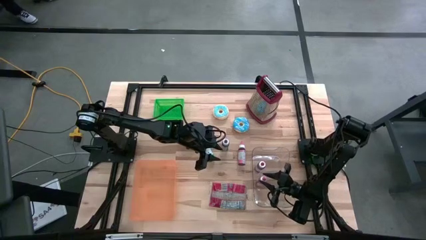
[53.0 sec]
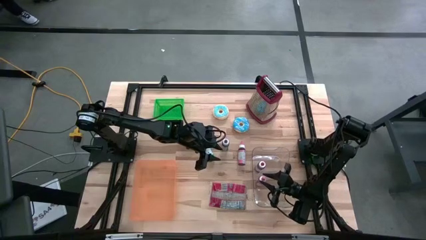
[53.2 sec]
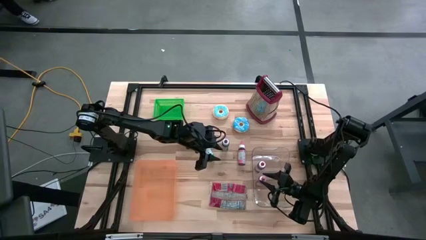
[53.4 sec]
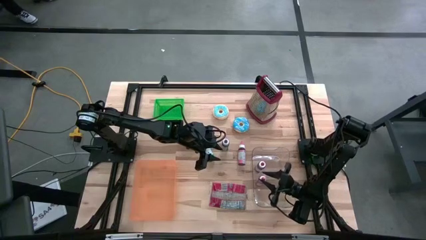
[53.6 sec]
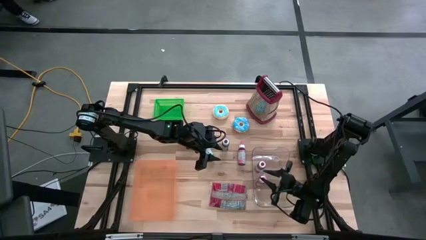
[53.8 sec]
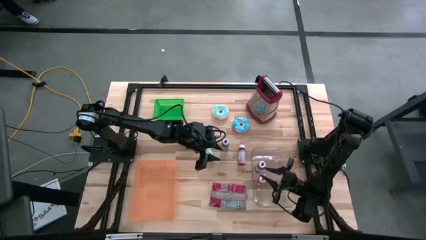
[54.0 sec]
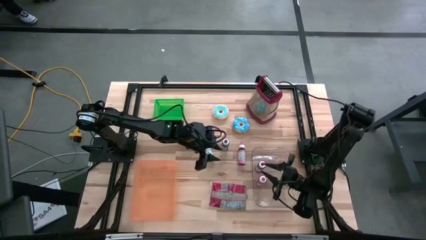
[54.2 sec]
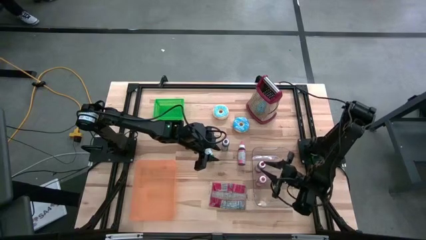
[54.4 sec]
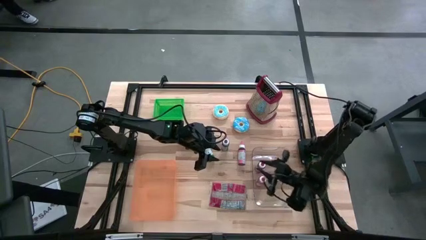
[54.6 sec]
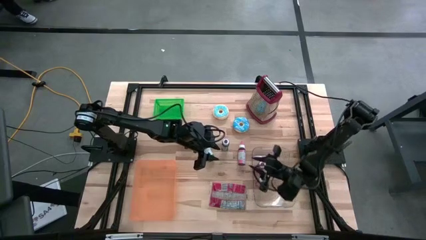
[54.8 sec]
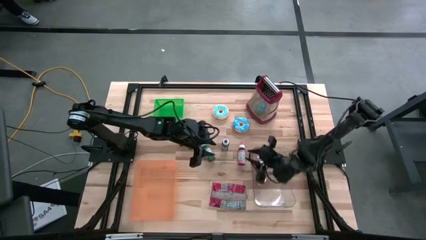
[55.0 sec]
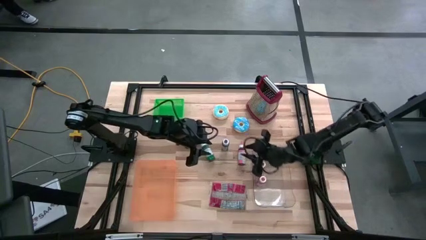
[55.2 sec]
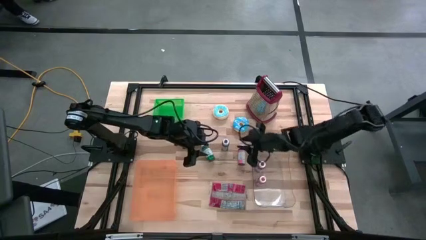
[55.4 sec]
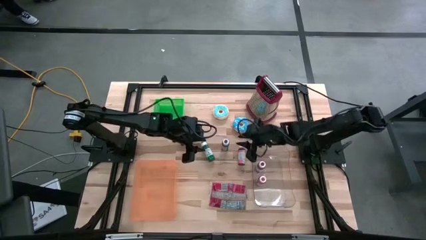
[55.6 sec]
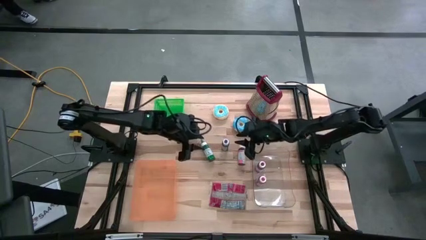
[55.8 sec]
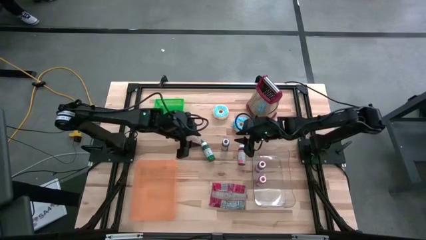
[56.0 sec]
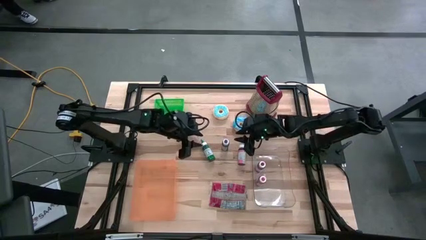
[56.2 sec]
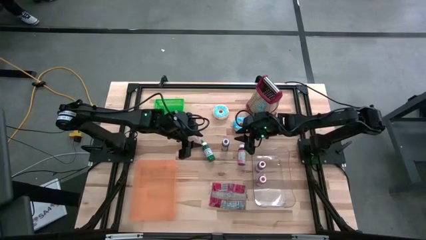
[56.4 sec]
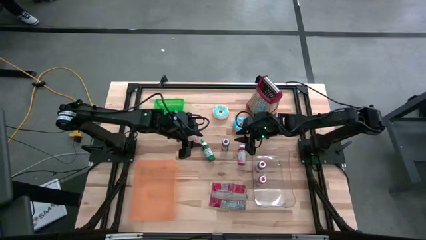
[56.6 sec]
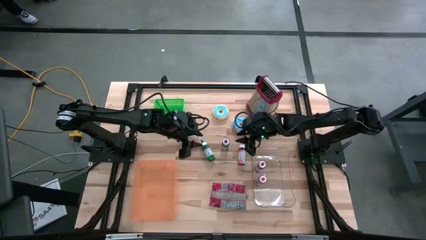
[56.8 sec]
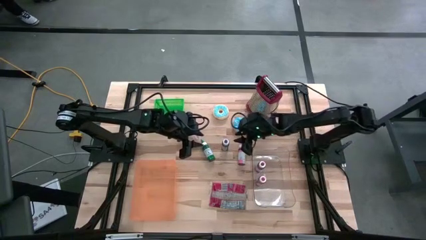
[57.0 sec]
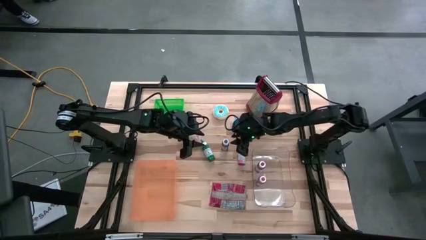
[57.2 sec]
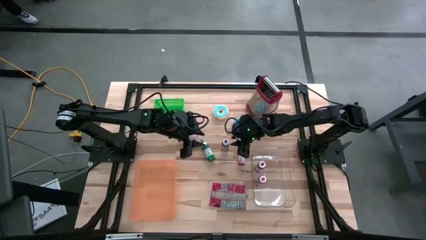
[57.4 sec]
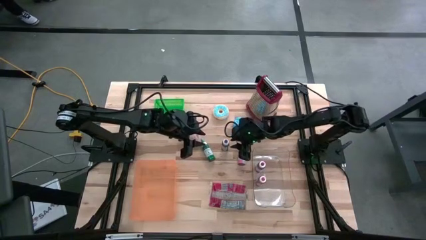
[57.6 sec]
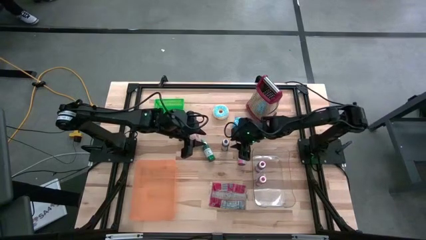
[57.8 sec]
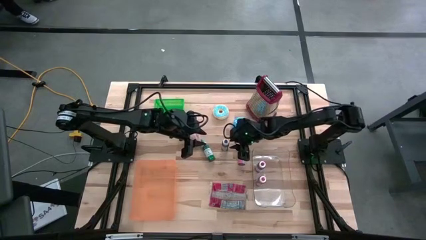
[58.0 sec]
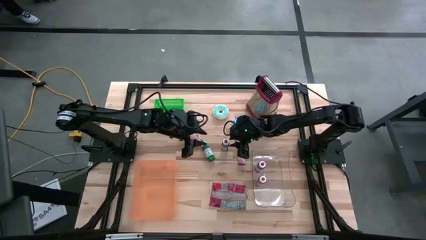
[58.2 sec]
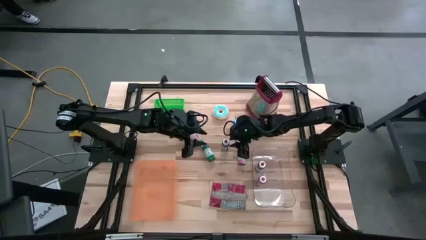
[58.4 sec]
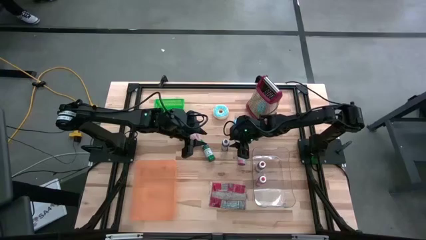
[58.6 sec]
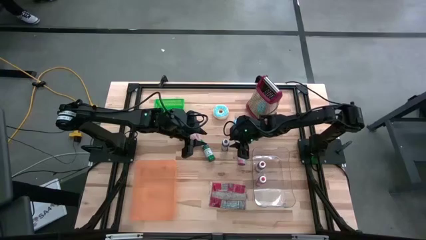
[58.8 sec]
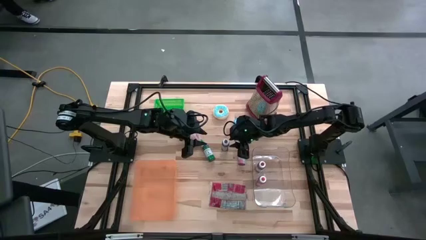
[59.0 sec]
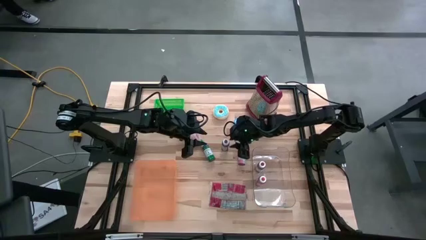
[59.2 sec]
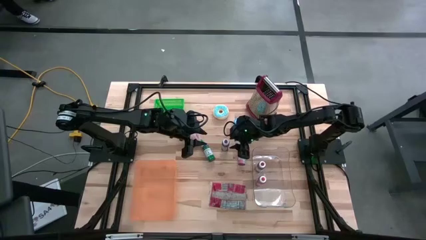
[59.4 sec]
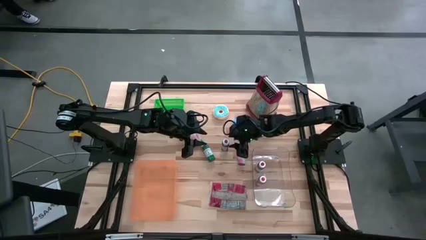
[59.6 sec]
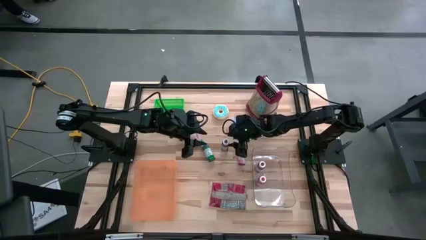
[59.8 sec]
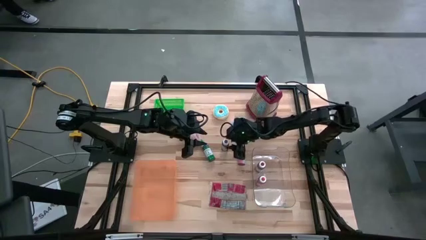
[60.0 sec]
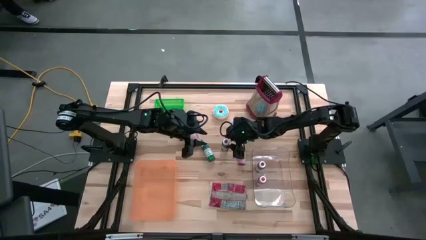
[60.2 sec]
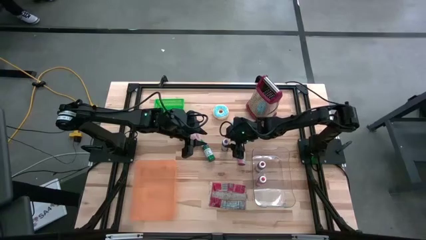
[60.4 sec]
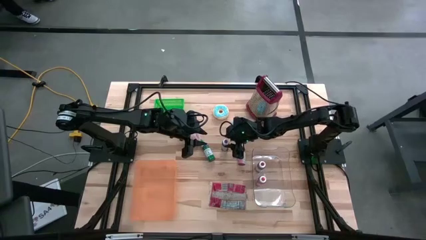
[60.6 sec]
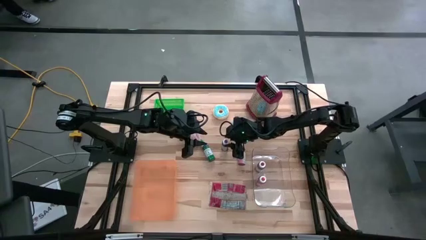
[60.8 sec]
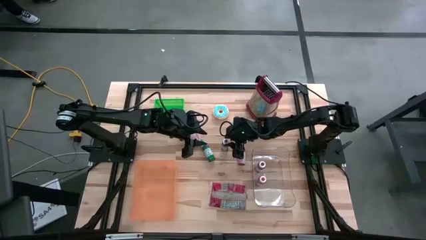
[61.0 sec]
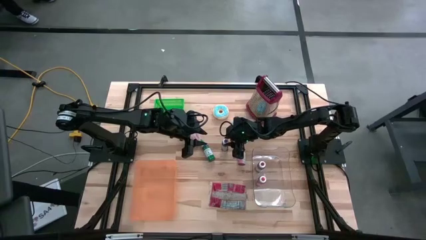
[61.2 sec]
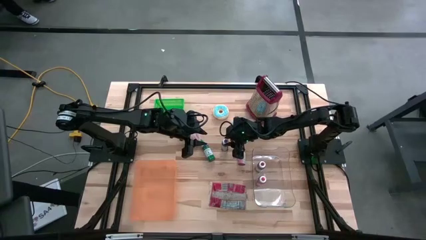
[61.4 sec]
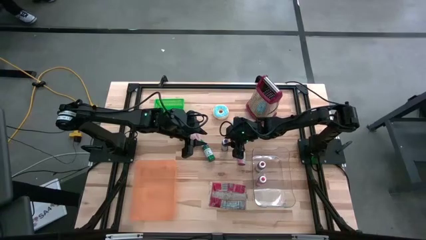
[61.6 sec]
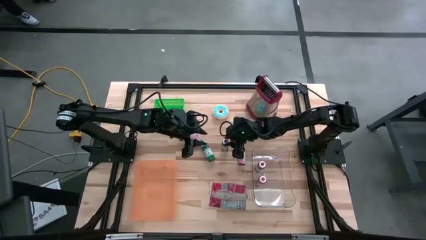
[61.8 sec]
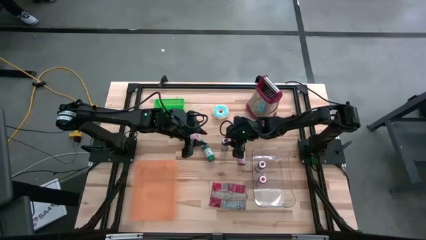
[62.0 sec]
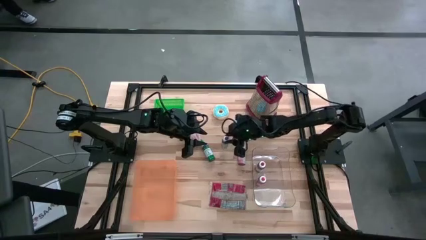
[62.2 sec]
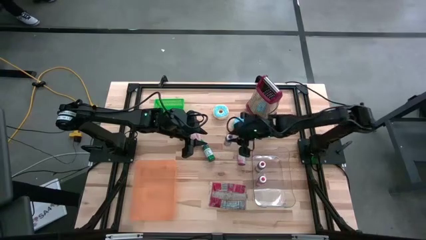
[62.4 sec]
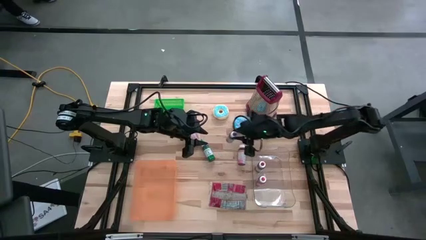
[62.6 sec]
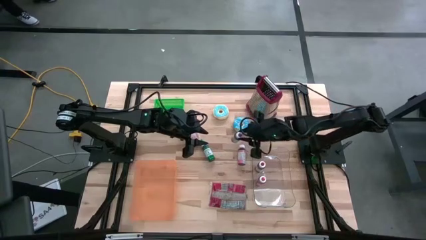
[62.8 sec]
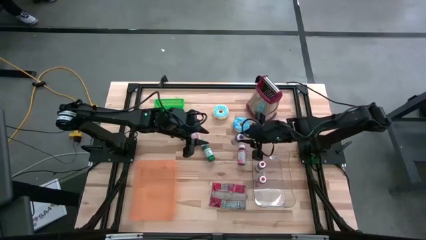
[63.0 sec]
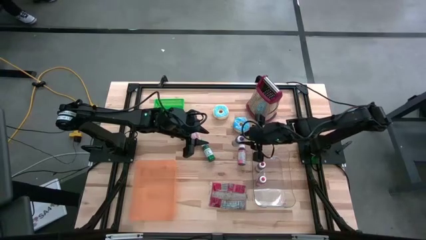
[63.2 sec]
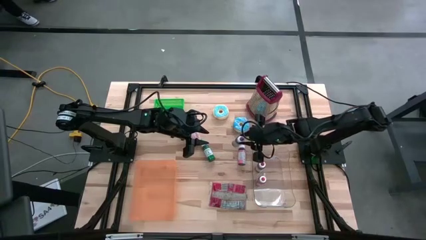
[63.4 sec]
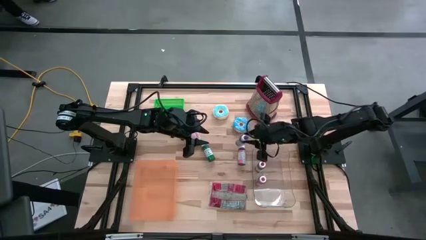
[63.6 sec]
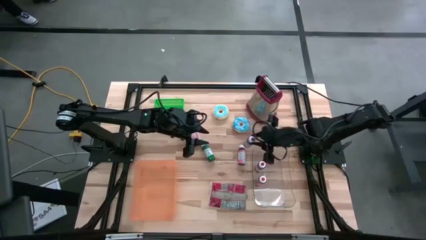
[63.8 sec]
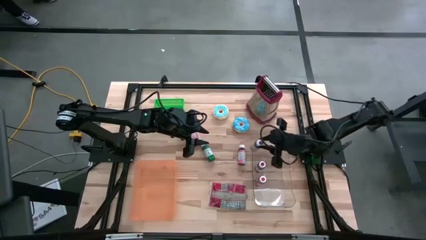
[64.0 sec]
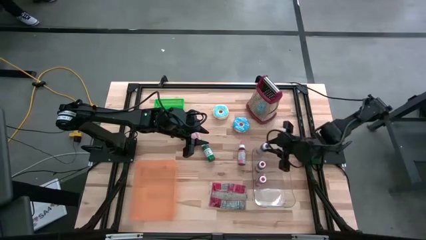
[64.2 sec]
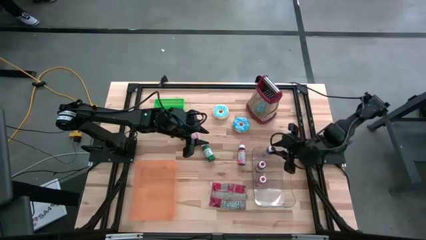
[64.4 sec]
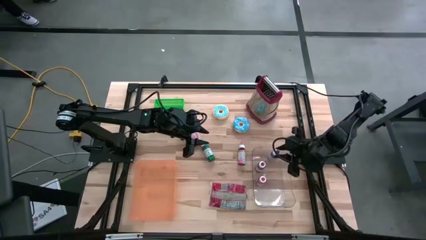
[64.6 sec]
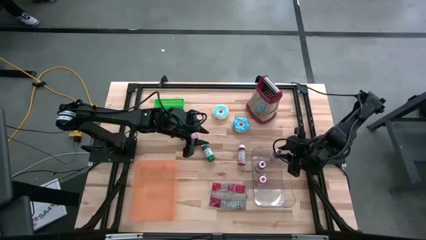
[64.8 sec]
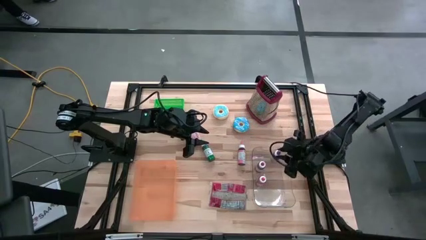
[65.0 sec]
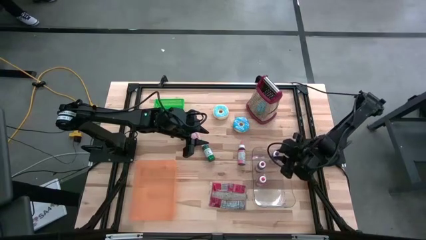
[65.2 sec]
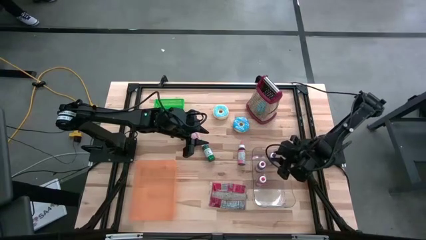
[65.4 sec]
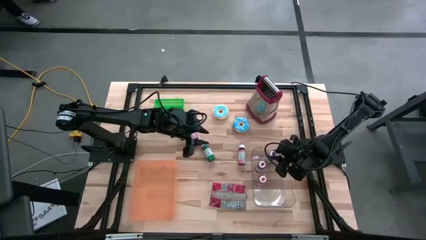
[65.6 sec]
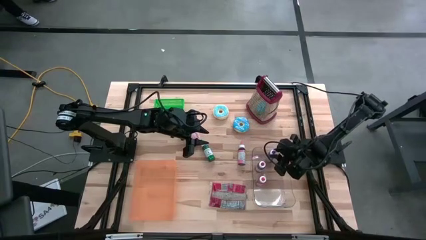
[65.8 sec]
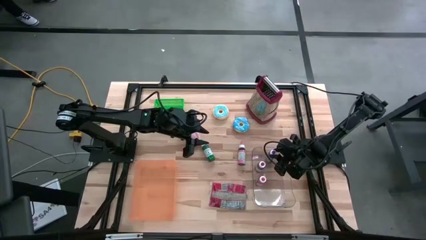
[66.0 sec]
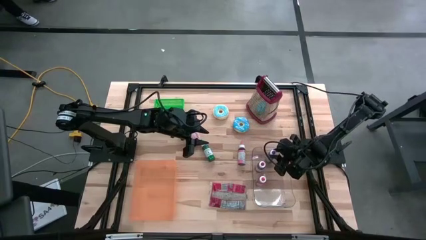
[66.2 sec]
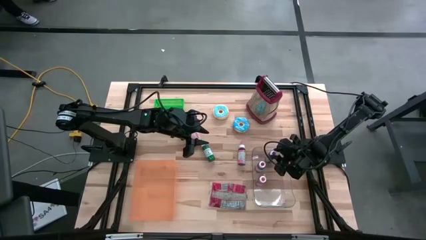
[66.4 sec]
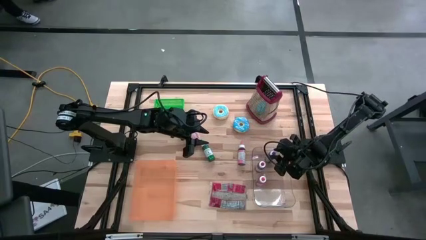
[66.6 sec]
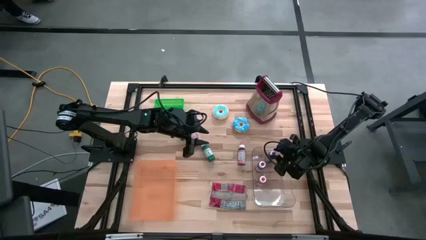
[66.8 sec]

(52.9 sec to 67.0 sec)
Put the purple paint bottle into the transparent bin

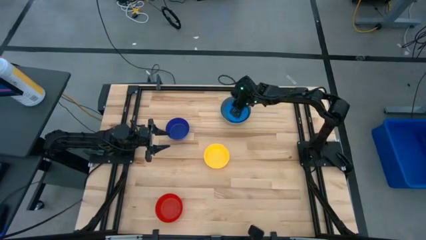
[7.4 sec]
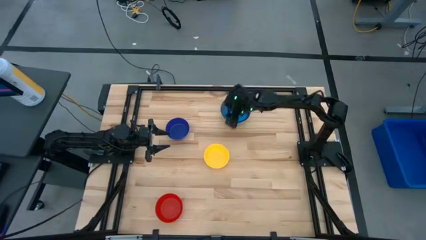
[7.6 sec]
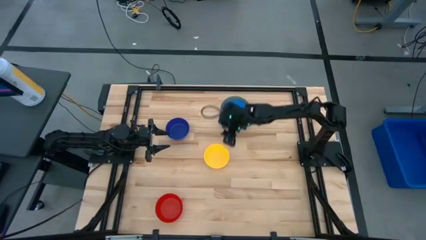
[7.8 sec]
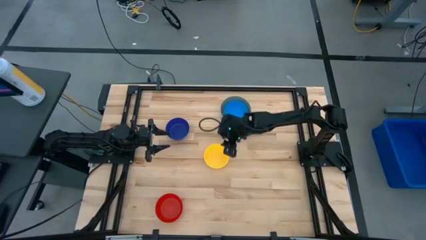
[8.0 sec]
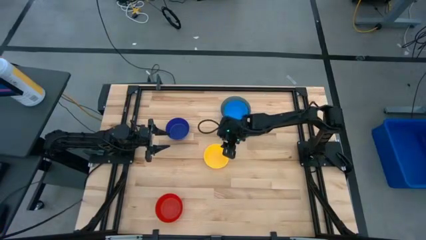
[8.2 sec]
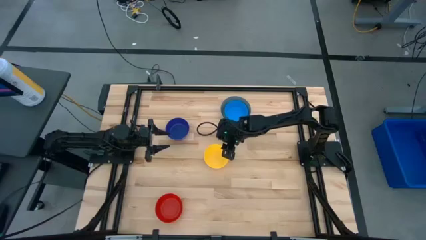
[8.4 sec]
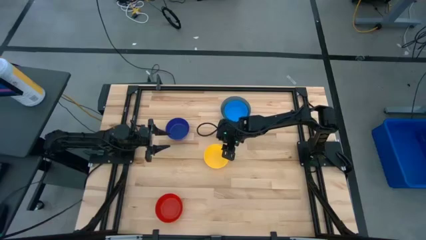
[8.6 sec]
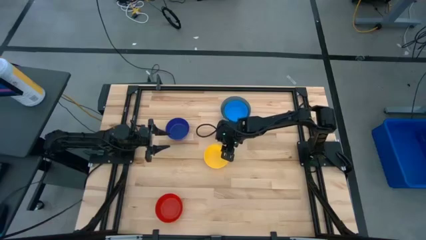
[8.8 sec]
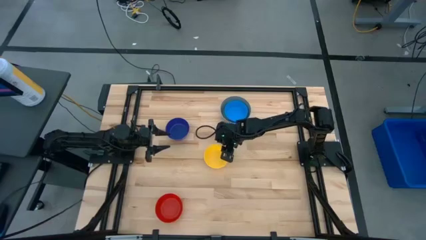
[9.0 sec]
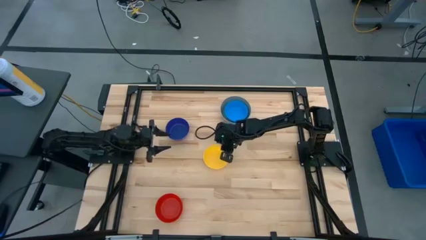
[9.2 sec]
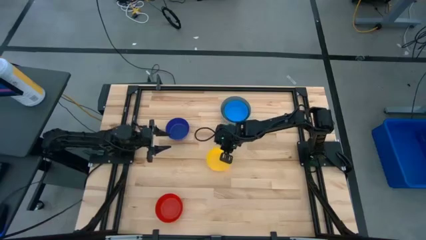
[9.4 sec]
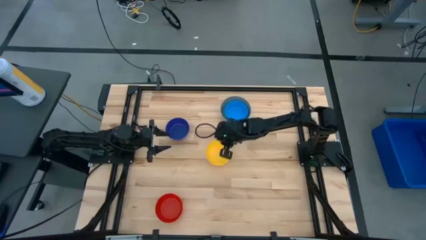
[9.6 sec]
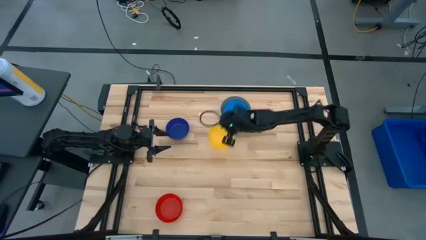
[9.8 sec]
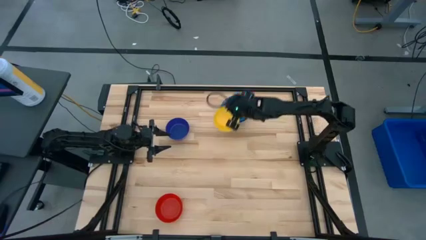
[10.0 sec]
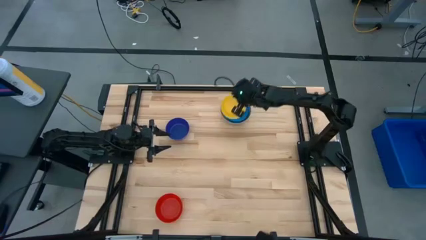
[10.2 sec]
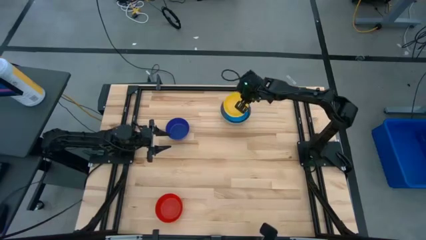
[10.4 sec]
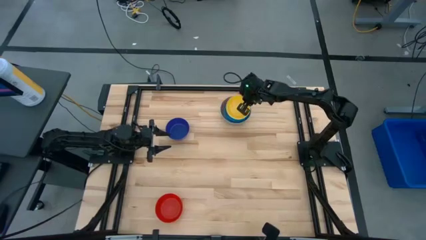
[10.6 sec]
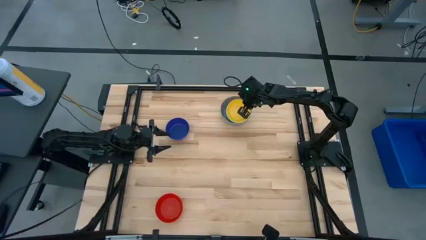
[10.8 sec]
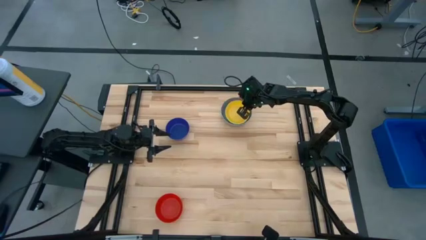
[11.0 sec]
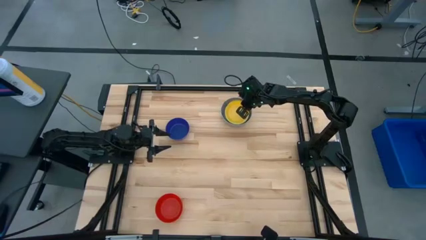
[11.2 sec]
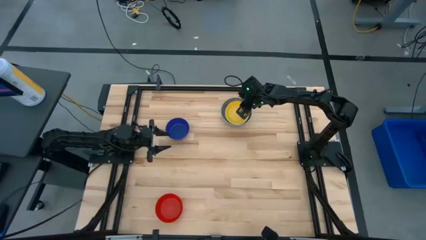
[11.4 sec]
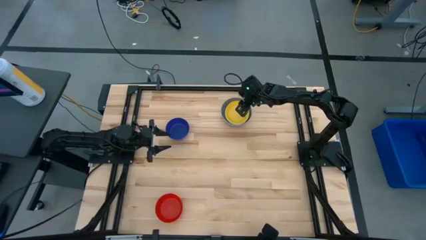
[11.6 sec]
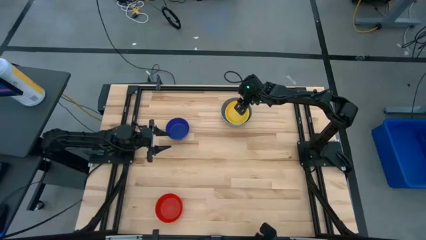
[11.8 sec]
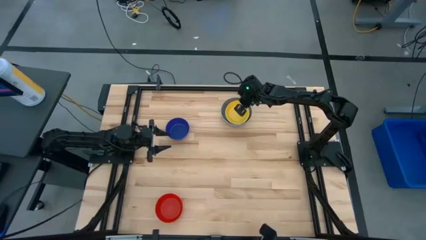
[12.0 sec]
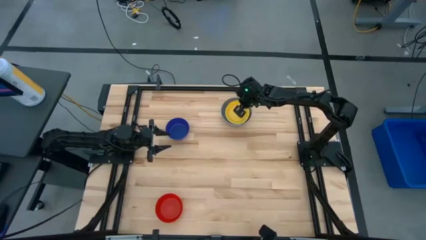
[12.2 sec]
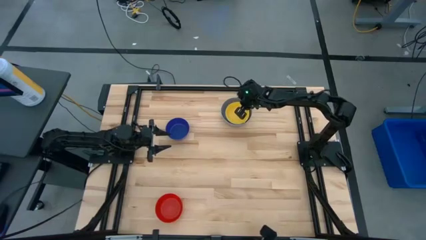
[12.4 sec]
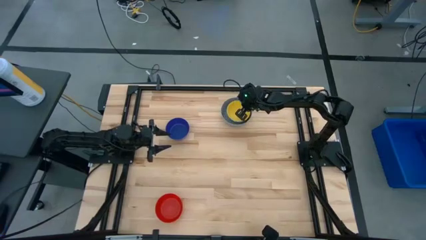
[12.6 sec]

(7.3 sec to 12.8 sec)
Stack the yellow bowl on top of the blue bowl
